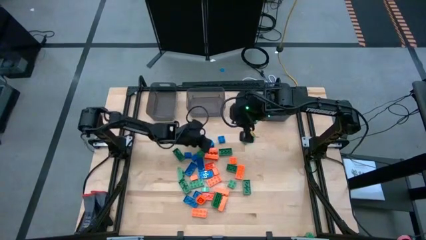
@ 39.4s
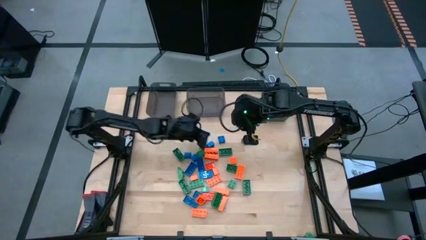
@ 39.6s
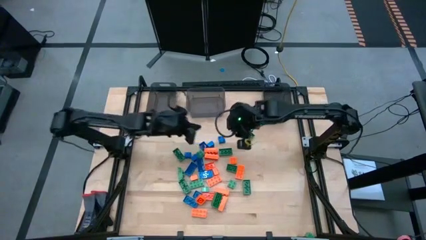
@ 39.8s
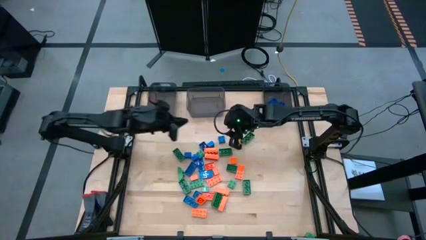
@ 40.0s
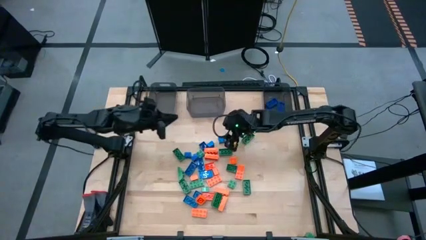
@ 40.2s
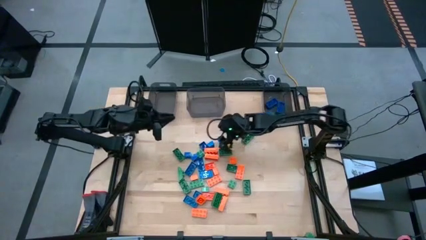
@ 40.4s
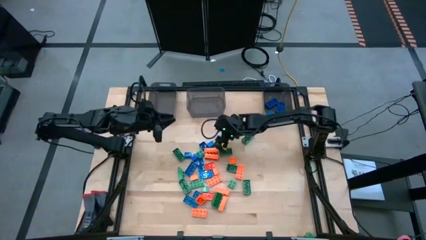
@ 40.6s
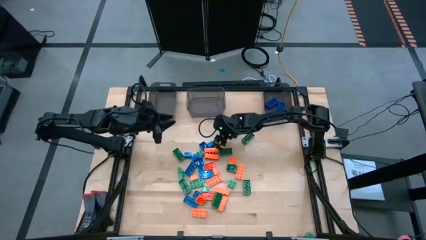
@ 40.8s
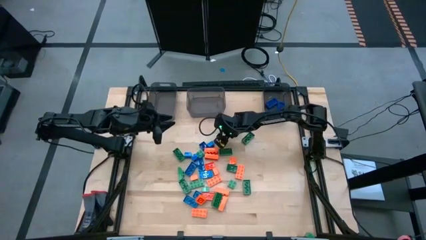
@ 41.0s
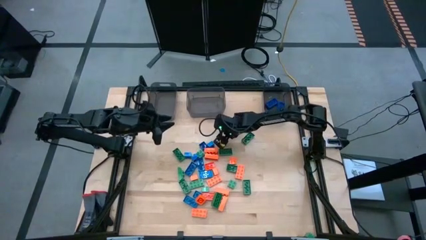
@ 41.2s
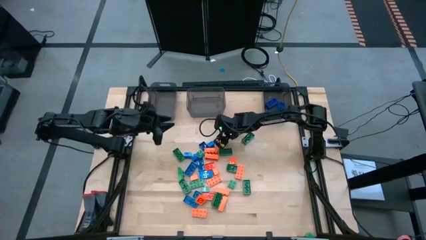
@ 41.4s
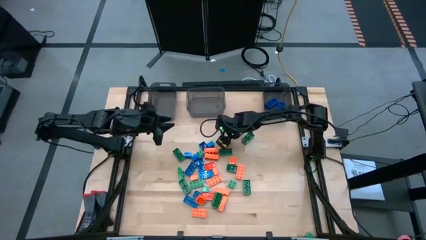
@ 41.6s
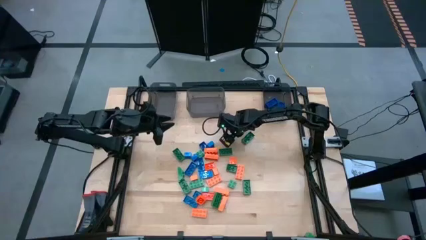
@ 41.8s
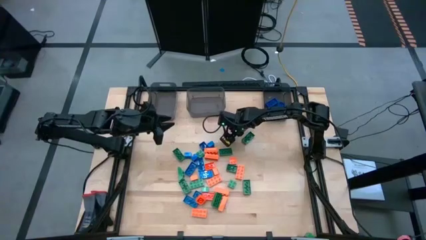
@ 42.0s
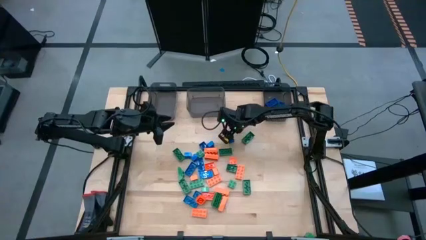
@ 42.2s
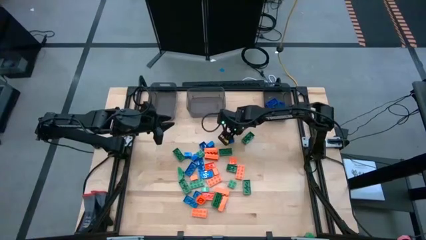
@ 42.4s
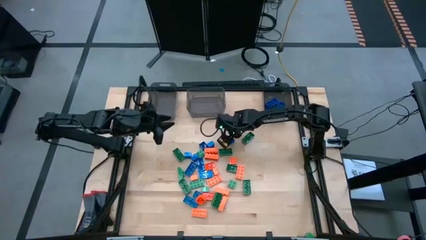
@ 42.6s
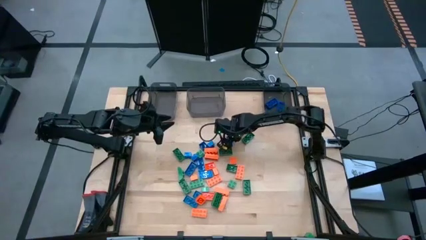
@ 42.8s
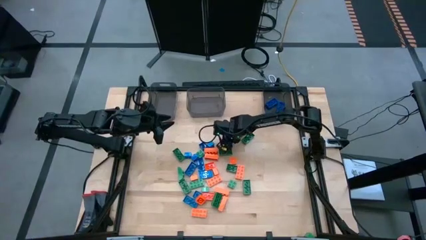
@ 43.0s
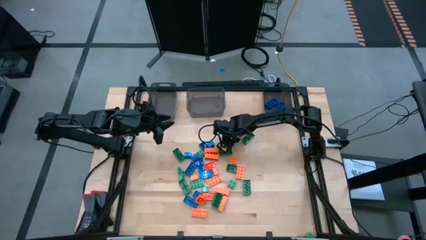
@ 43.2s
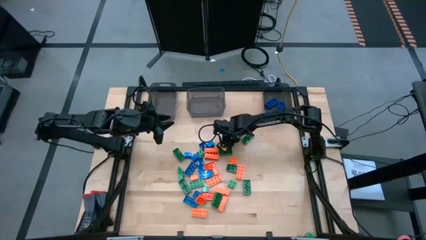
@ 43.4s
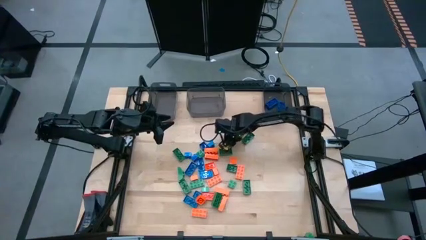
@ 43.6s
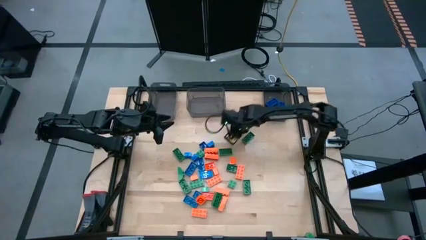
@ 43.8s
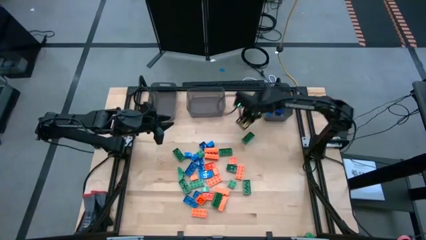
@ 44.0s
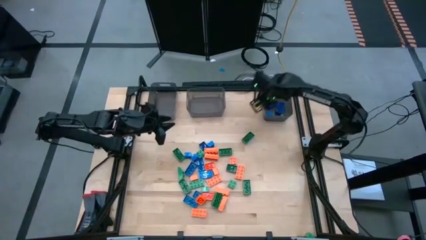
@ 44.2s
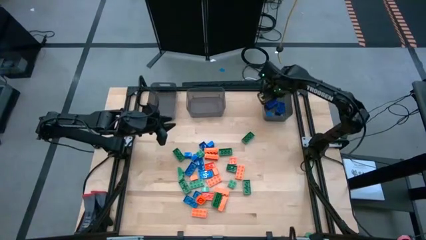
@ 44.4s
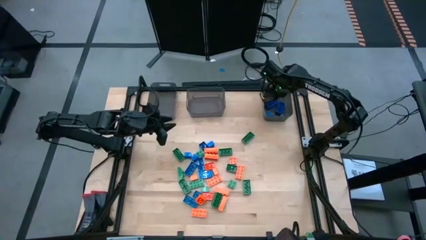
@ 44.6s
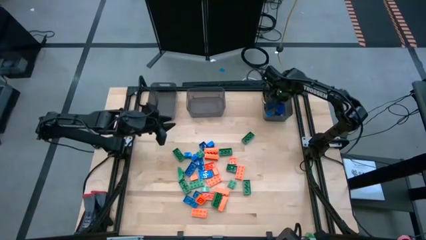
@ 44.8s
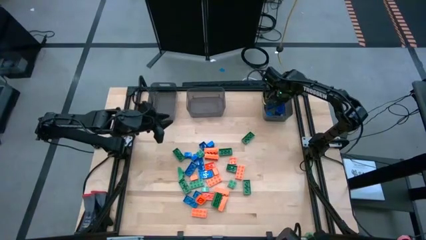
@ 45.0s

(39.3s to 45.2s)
Task: Sort blocks
Put the blue game piece into the right black bin

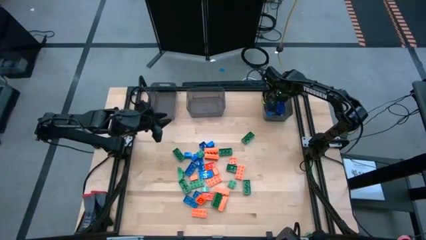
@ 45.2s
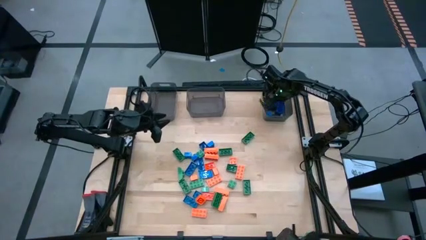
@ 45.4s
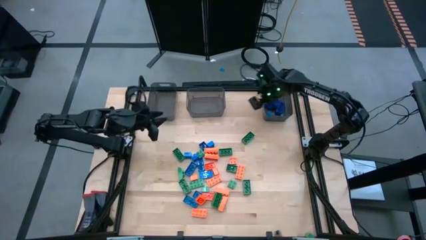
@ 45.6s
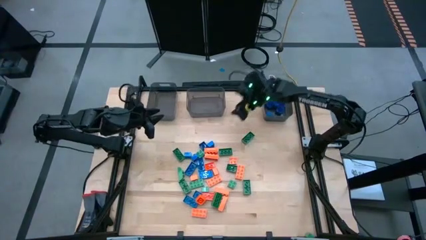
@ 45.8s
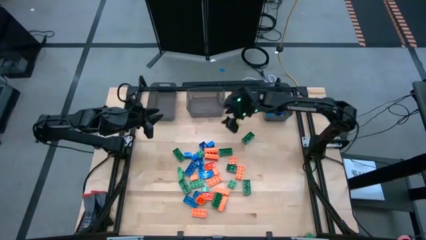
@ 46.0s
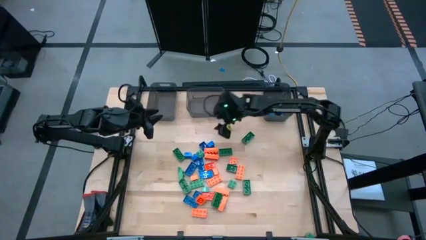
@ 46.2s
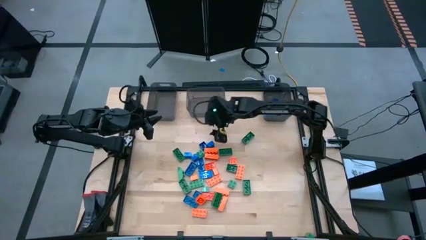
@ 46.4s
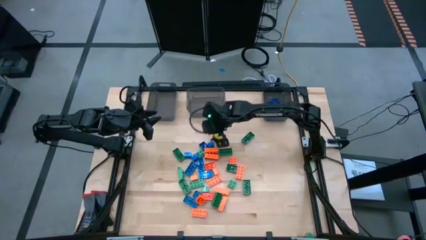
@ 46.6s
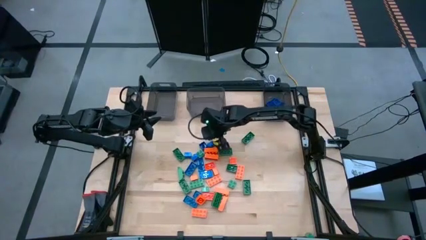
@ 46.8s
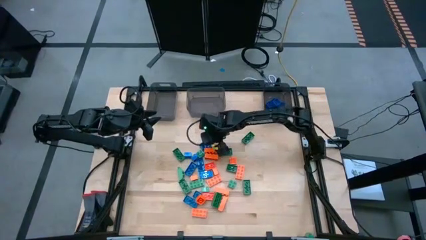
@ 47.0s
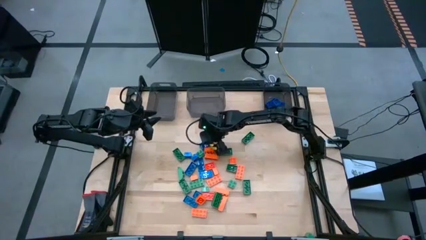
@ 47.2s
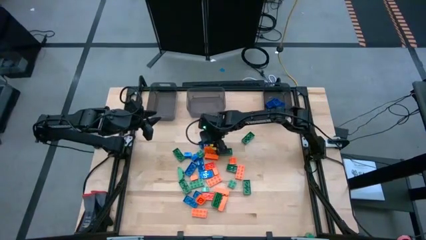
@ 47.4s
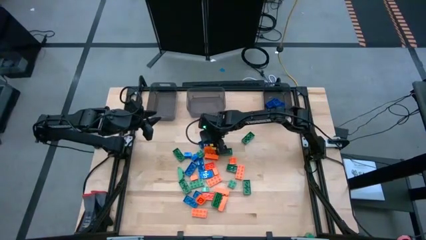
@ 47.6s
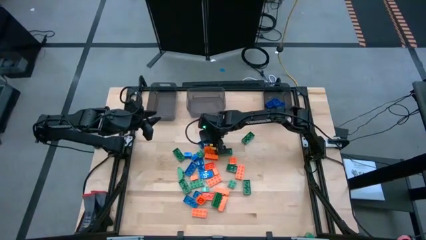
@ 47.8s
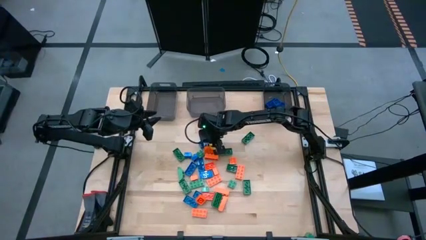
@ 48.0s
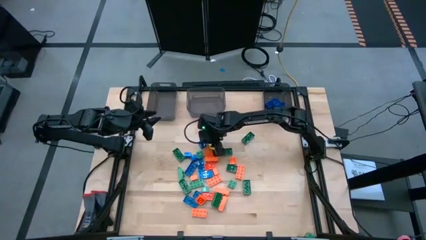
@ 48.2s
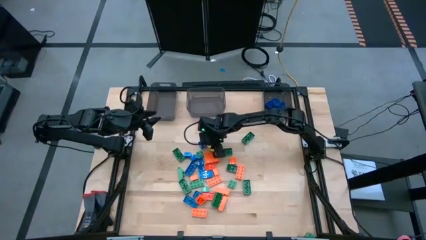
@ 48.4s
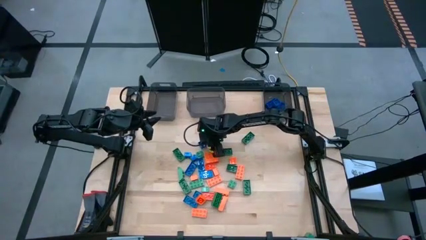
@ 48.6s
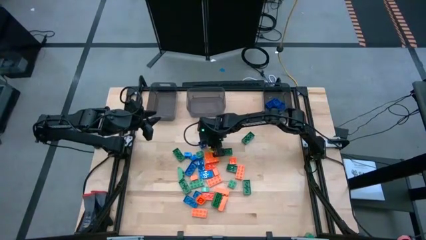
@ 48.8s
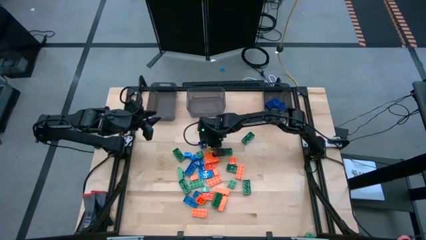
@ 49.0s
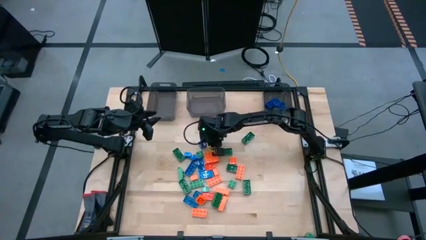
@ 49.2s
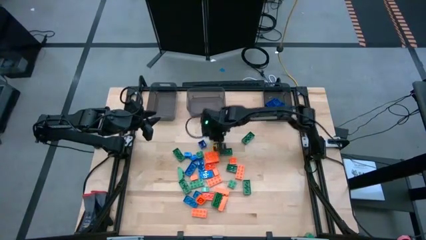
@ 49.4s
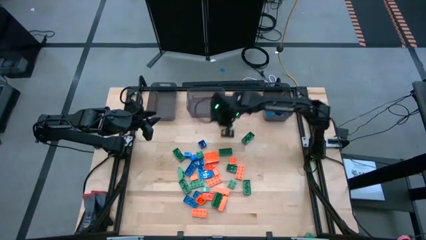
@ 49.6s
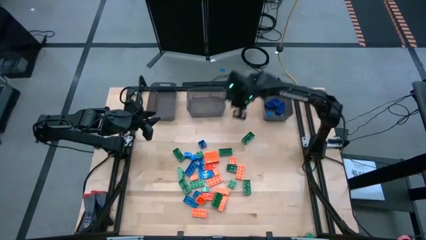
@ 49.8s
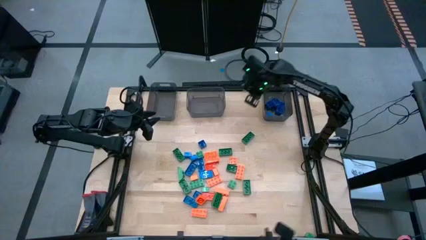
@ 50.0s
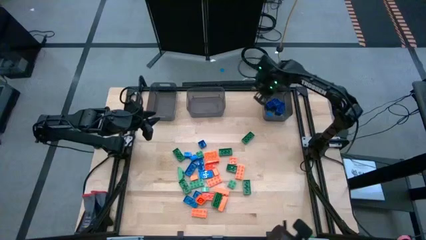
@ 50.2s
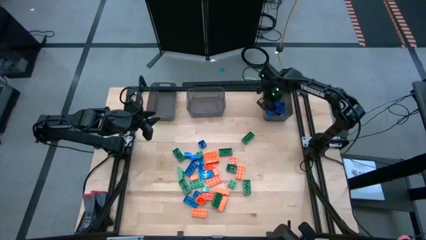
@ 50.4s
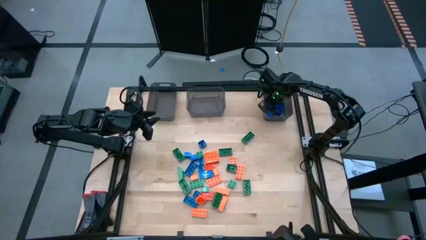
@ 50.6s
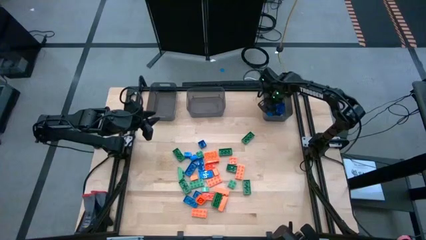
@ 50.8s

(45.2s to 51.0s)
Put the blue game piece into the right black bin

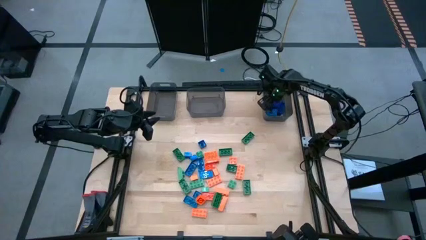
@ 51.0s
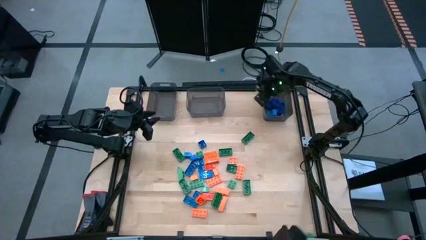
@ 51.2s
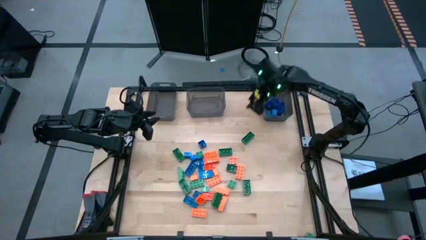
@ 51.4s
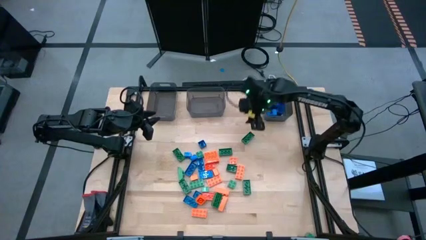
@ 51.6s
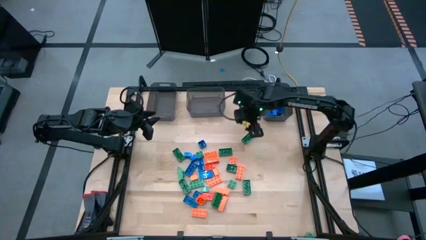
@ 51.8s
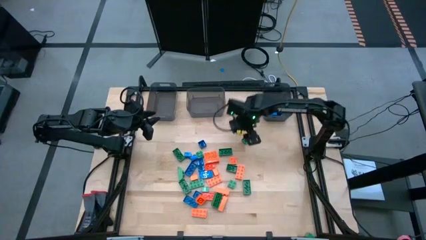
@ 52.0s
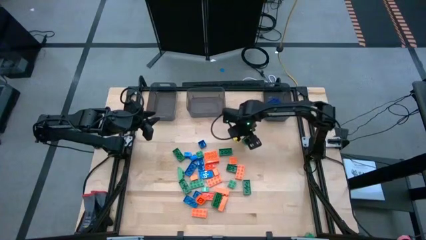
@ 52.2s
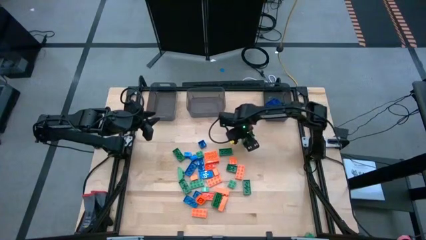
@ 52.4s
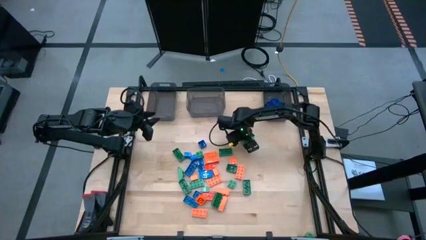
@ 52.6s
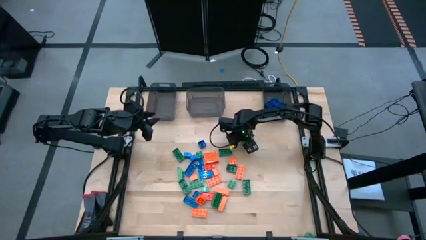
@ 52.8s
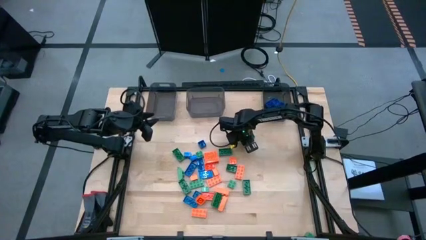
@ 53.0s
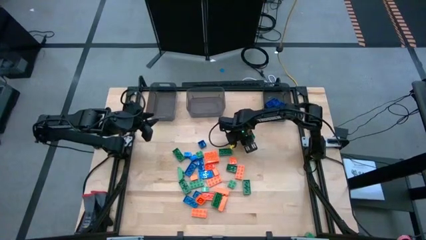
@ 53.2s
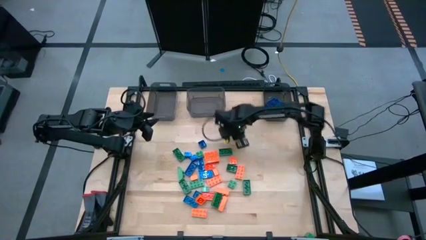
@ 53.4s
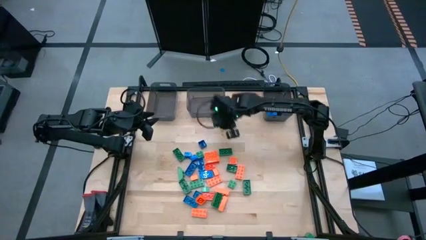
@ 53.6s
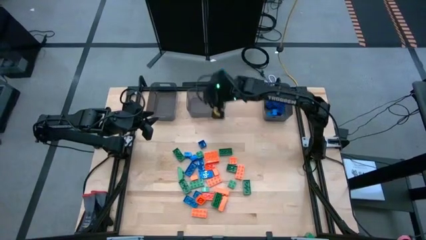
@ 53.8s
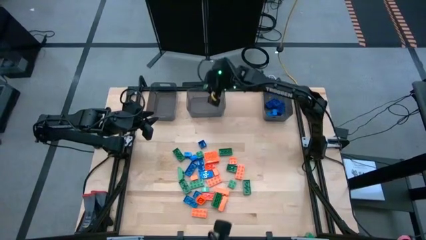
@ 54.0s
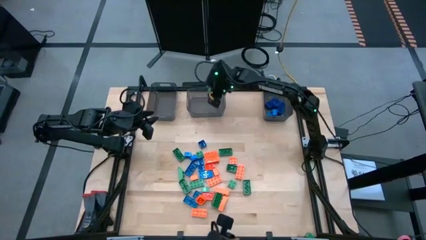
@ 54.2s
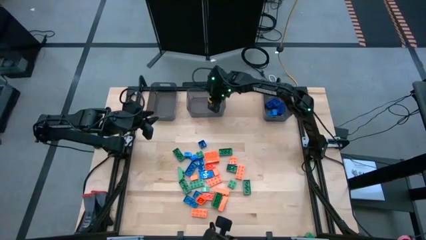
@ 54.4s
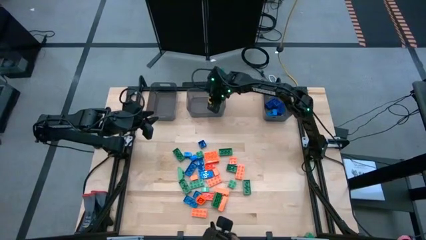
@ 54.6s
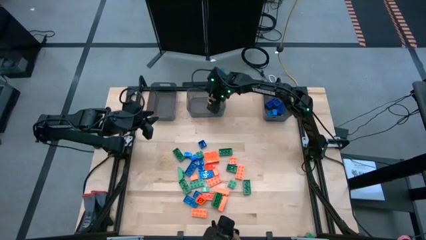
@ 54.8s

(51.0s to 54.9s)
Put the green piece into the middle black bin

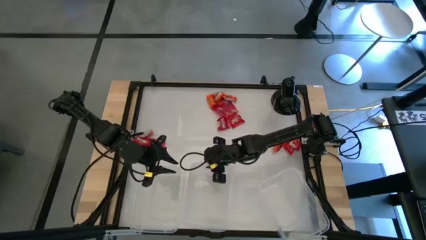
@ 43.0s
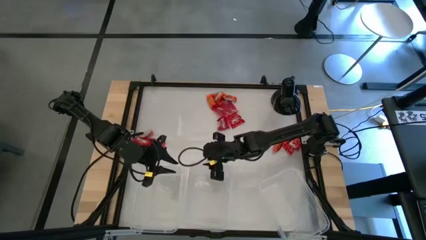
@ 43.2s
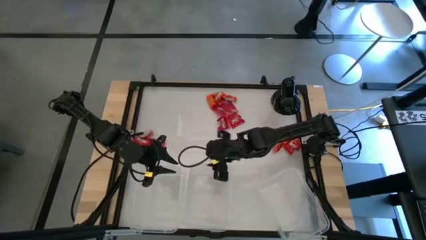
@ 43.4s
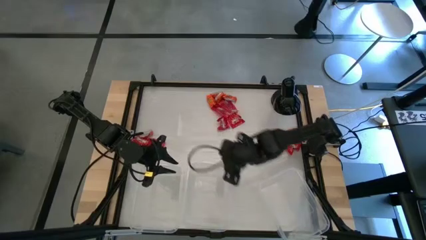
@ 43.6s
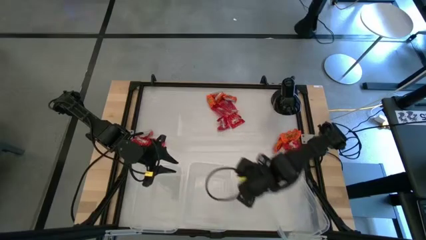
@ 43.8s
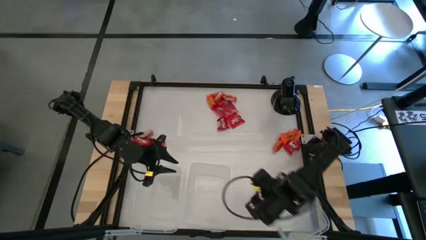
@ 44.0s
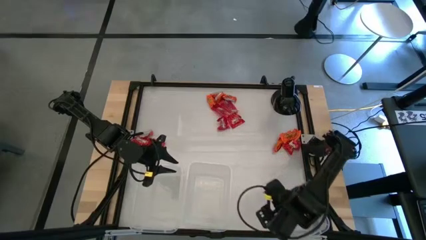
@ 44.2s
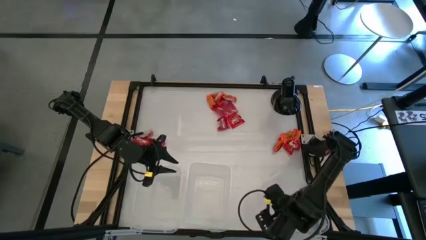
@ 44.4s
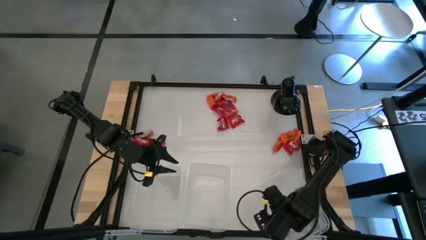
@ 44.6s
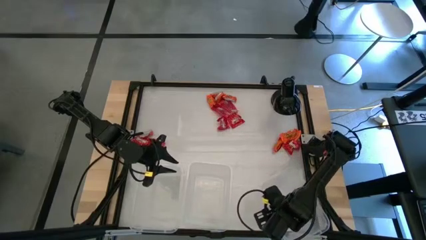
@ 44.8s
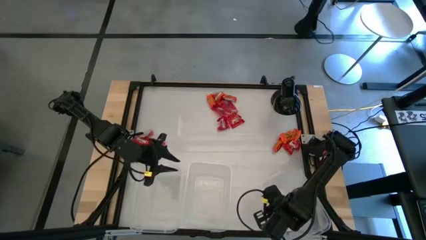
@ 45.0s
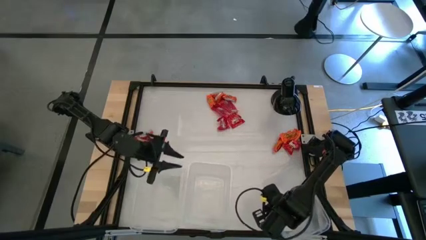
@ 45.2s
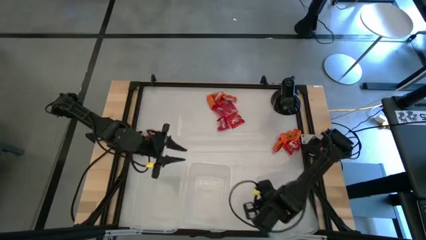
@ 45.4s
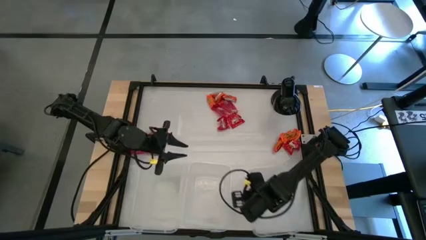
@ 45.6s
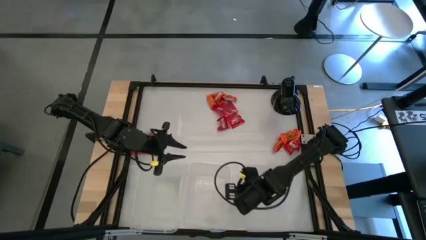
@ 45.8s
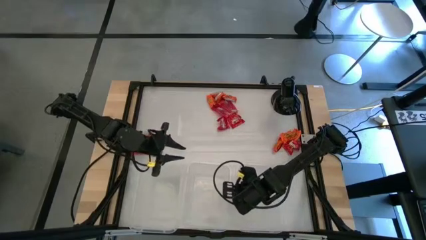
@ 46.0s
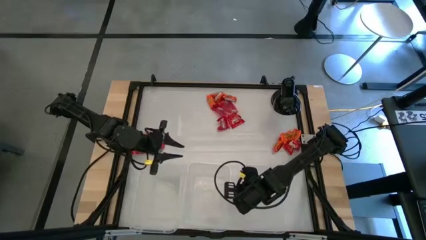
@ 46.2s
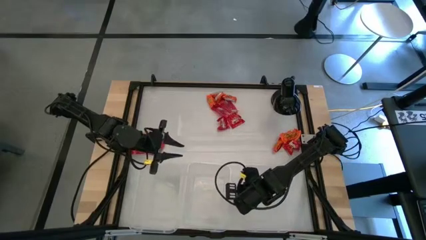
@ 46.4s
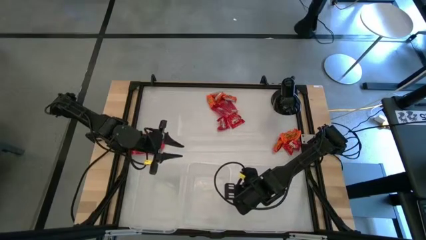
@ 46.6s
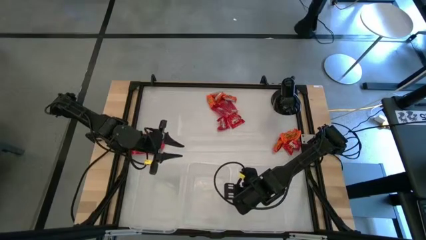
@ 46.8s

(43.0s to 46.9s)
Task: Sort candy
Adjust the right transparent bin
